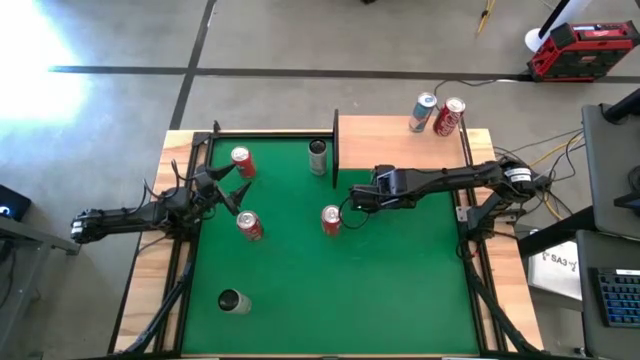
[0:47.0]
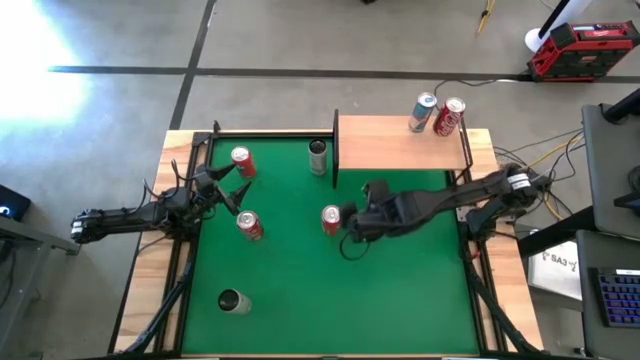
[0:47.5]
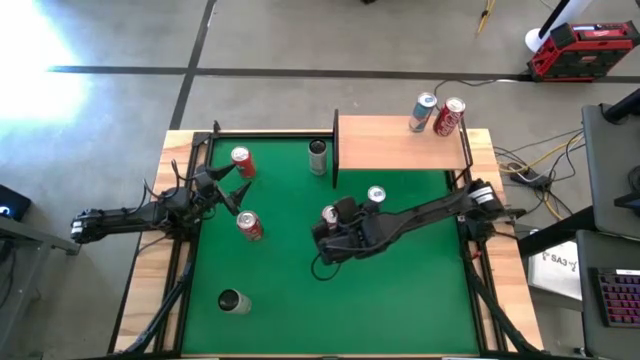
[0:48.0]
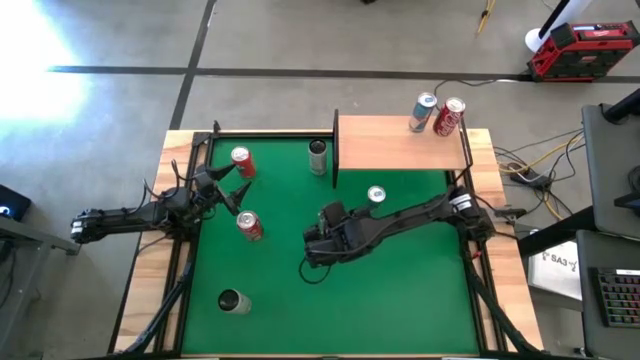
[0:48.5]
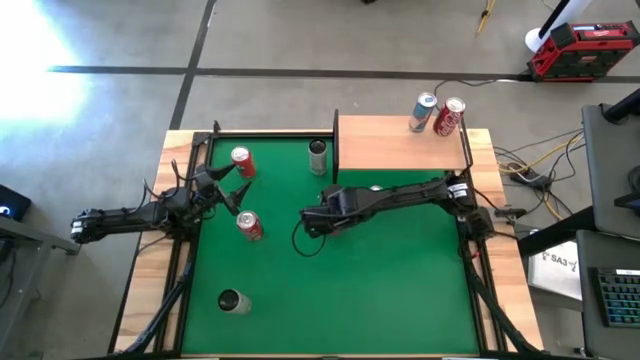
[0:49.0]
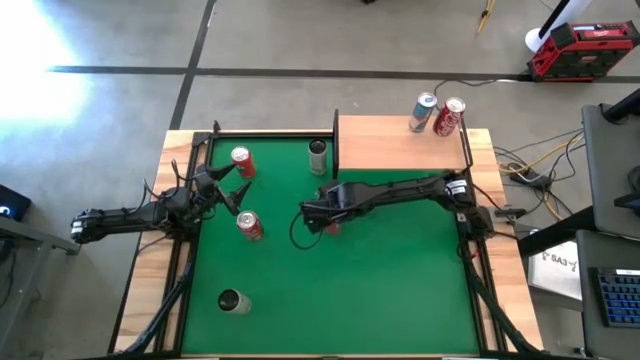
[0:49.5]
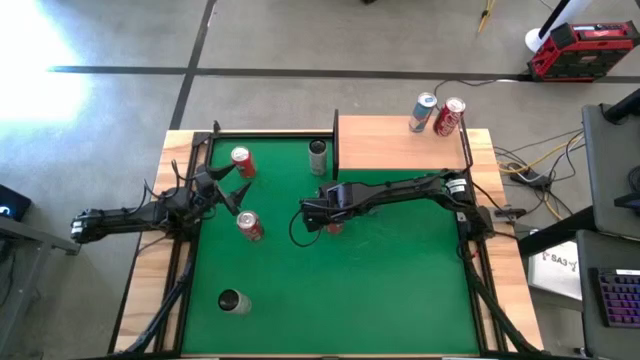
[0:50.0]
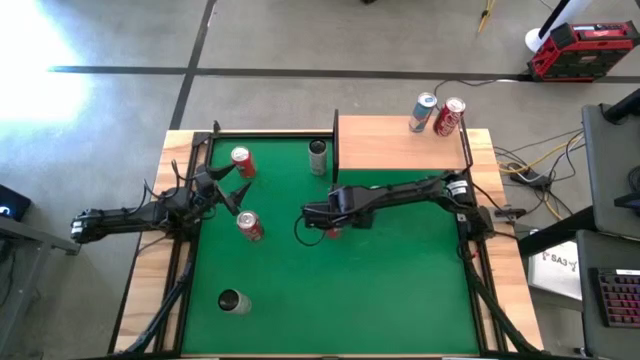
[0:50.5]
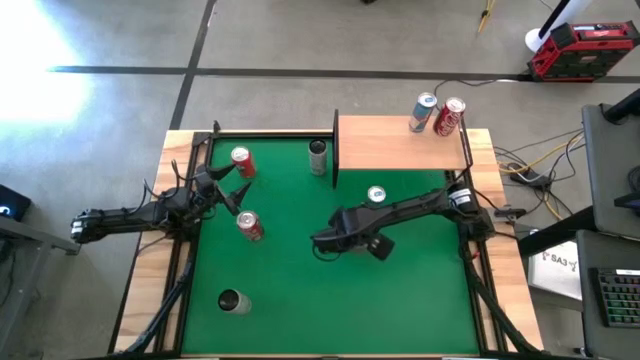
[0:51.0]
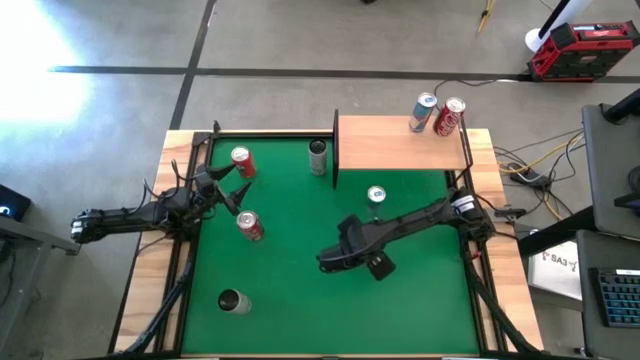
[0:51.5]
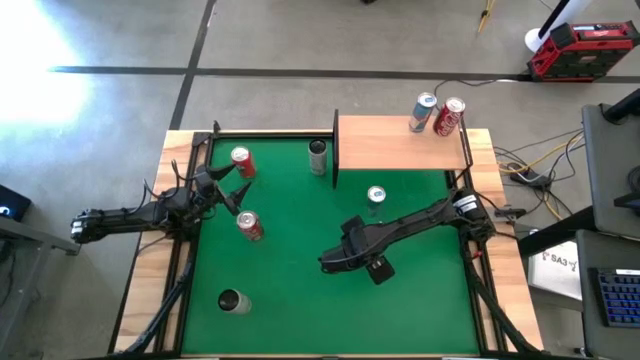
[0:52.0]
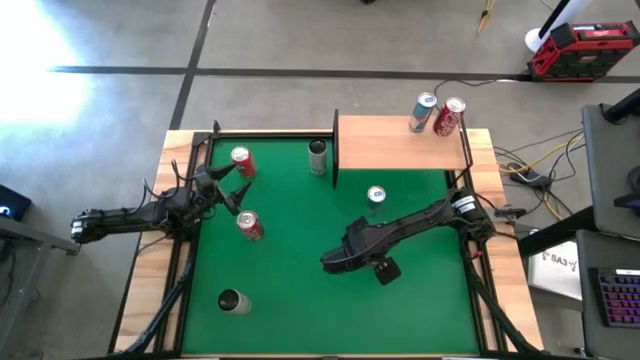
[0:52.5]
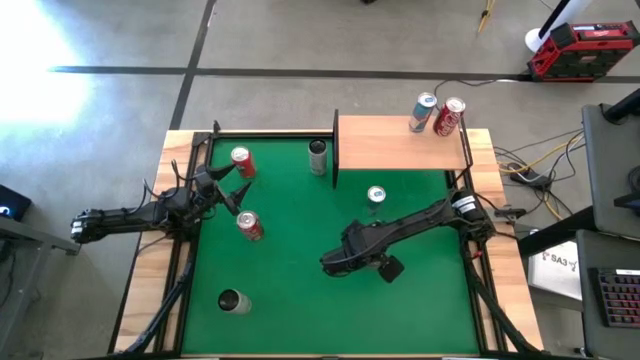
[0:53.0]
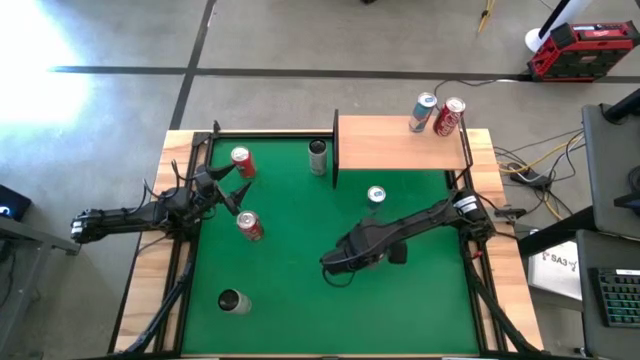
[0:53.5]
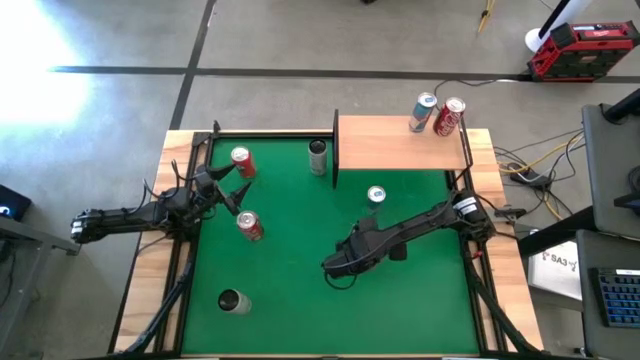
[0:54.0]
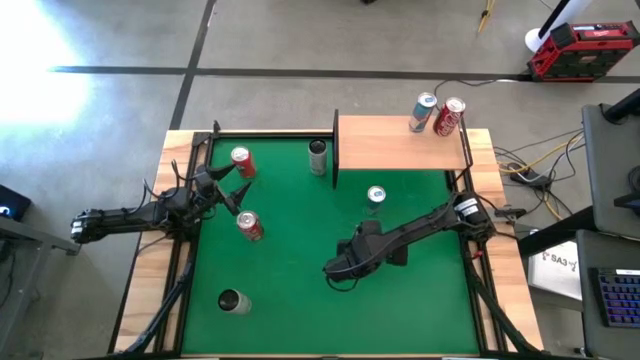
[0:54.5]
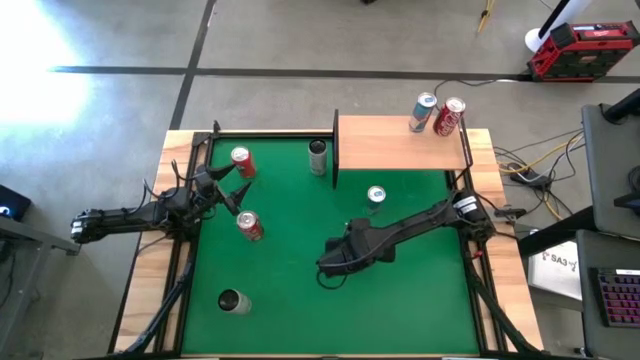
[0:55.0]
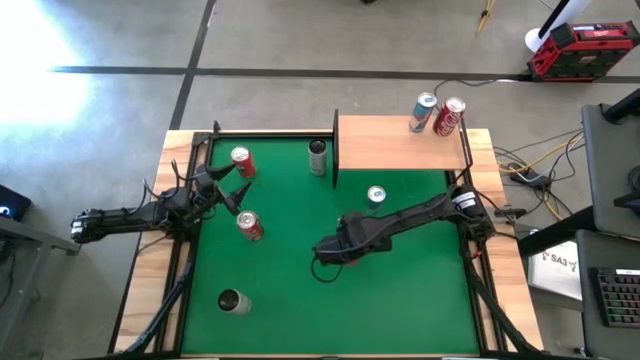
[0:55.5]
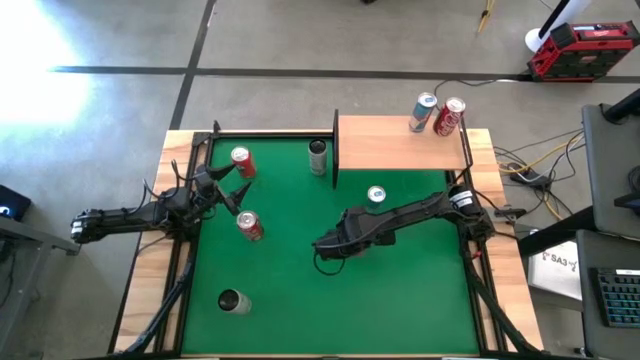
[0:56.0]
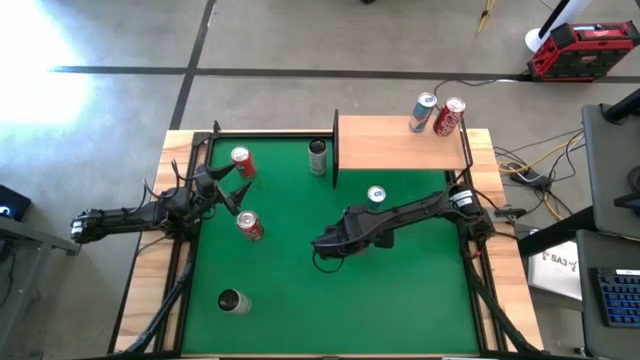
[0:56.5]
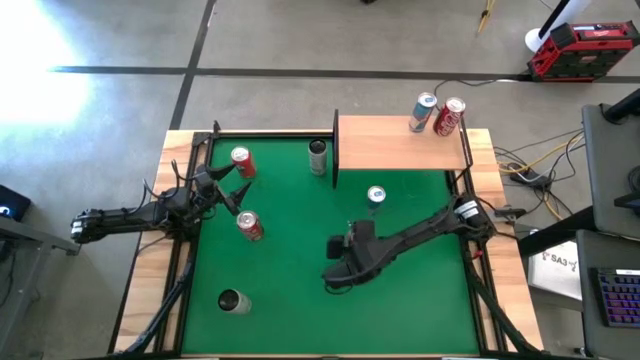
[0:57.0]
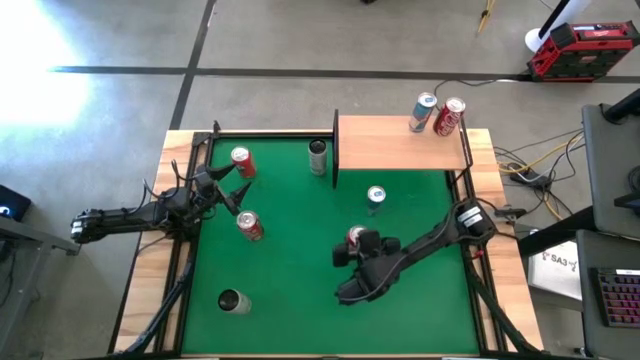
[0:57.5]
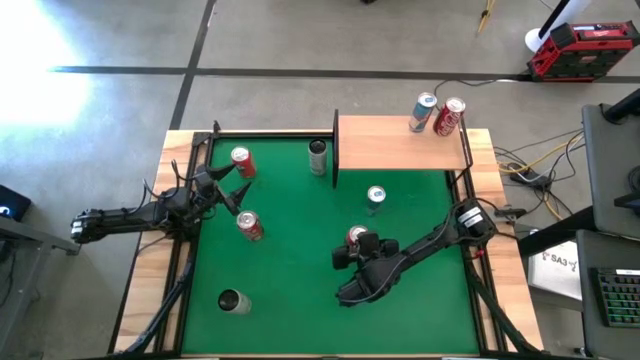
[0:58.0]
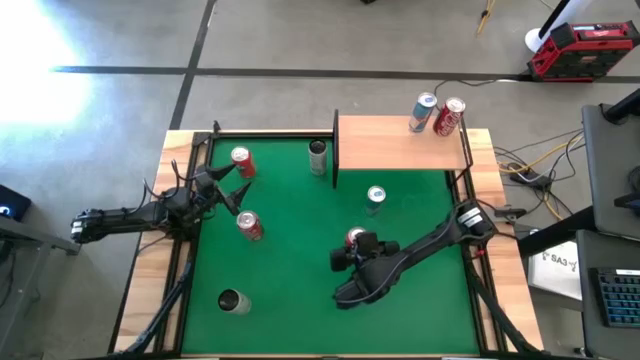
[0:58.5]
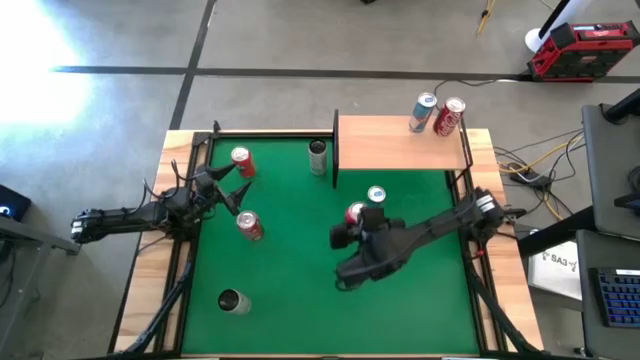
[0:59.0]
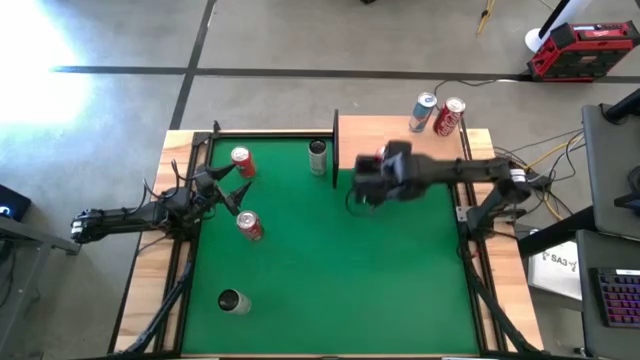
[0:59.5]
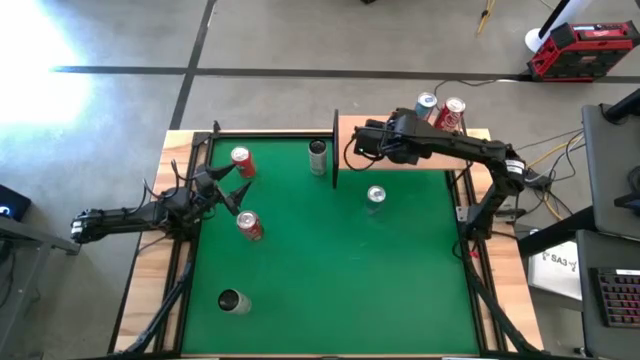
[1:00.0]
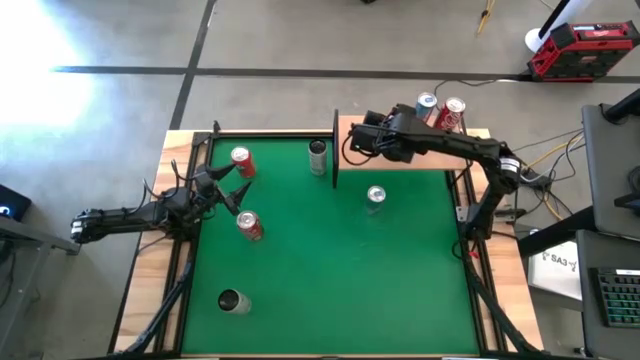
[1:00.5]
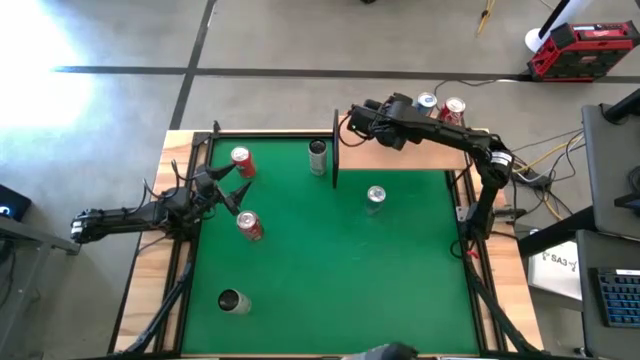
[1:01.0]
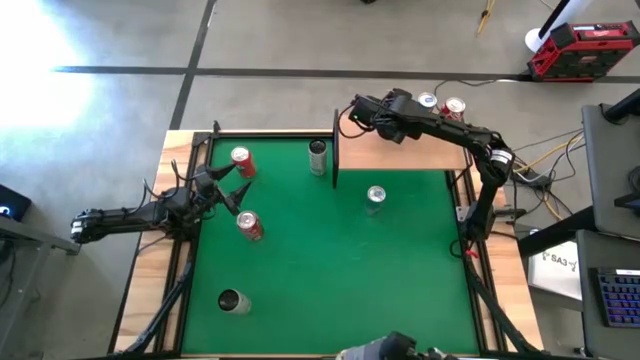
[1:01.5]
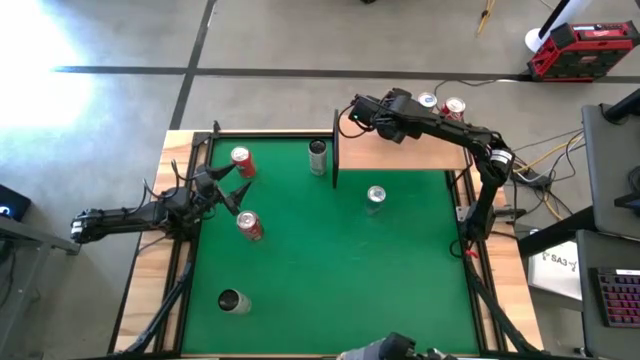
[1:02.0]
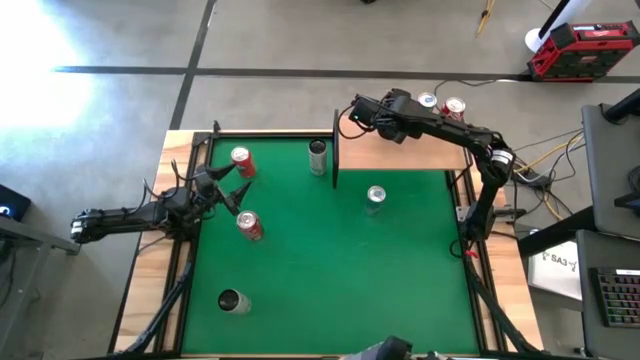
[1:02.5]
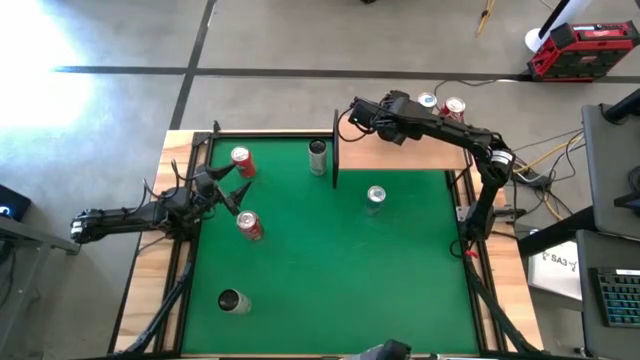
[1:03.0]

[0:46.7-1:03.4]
Task: Place canned beverage on shelf
Put the bottom red soda can on the shelf
